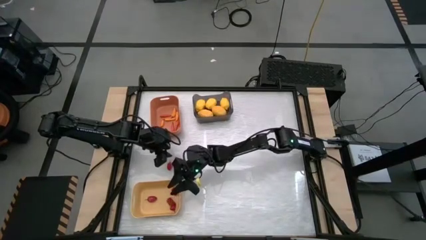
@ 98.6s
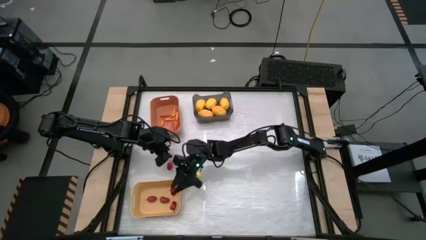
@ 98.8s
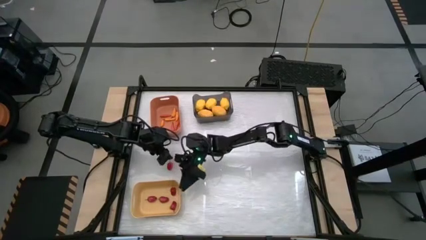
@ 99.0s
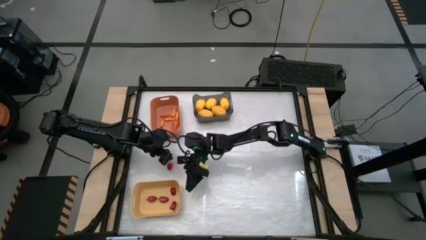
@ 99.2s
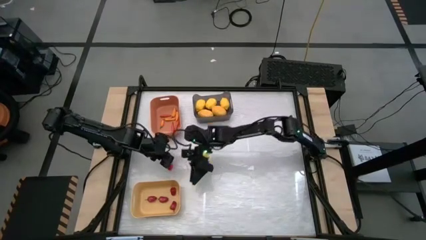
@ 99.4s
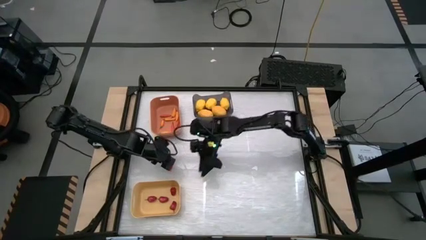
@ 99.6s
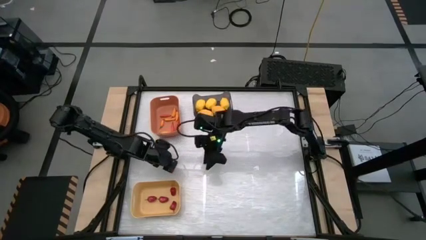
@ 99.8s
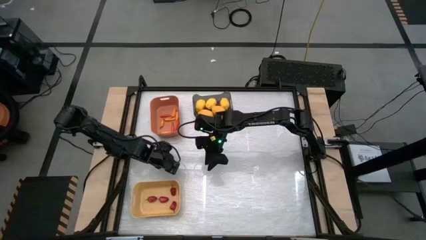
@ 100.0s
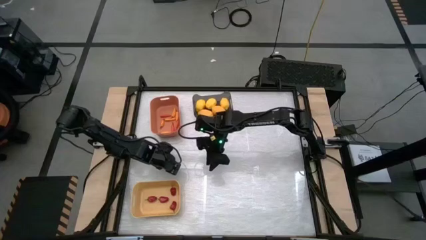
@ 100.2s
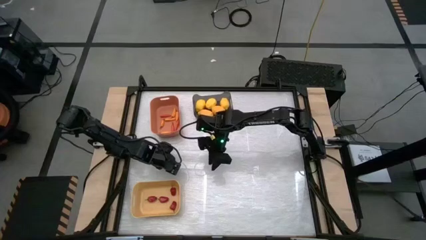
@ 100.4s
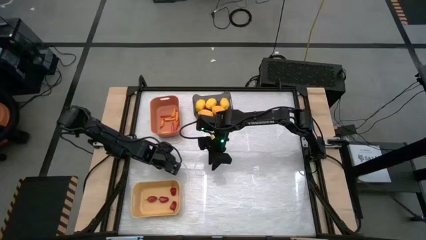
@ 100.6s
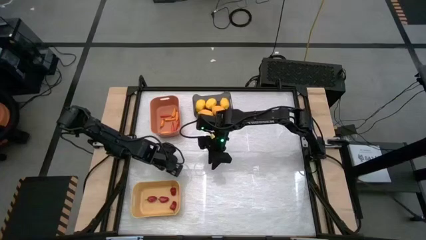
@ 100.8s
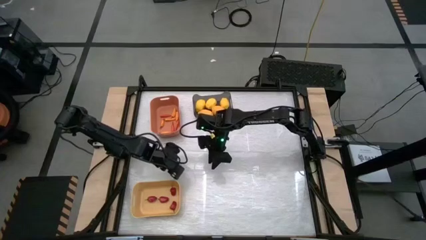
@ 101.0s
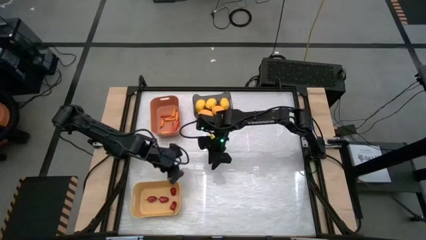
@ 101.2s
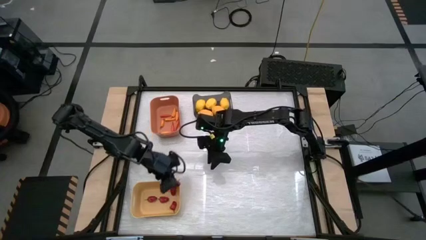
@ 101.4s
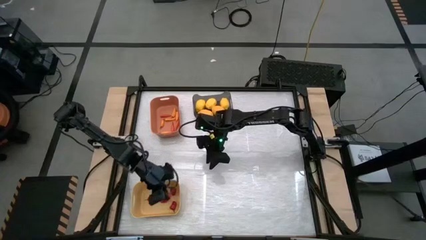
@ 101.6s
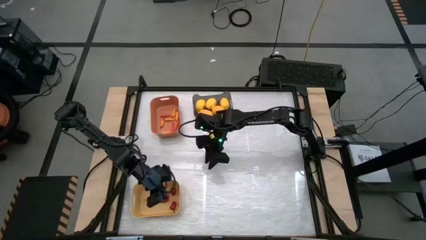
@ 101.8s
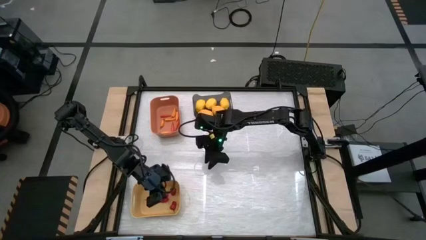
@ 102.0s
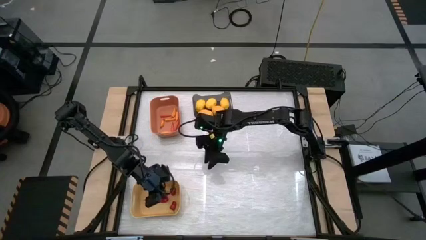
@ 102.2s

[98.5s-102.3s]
Task: Sort produce into baskets
Put the red chili pepper into the yellow bin

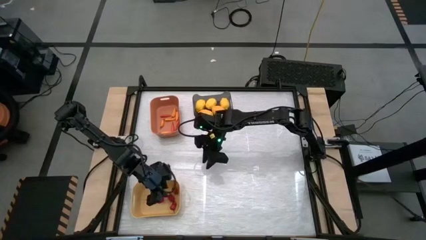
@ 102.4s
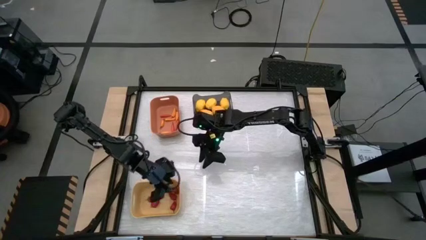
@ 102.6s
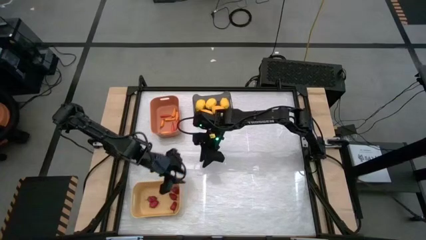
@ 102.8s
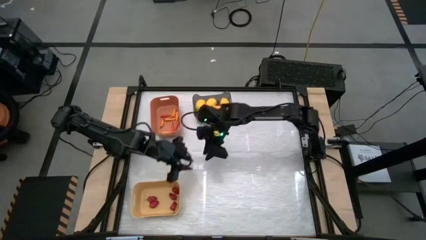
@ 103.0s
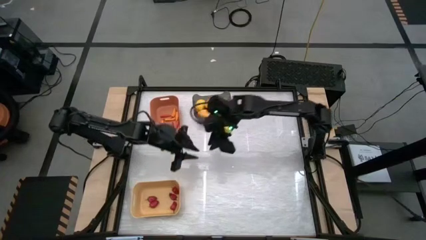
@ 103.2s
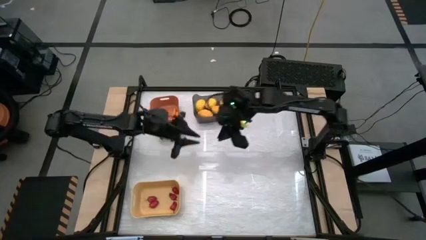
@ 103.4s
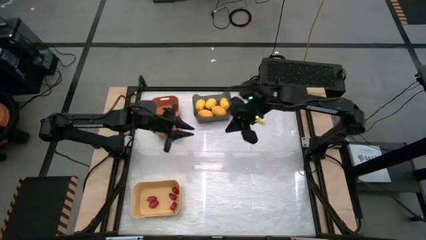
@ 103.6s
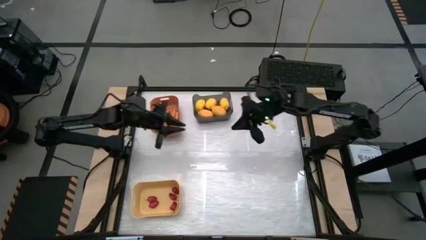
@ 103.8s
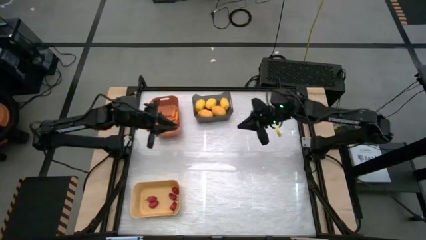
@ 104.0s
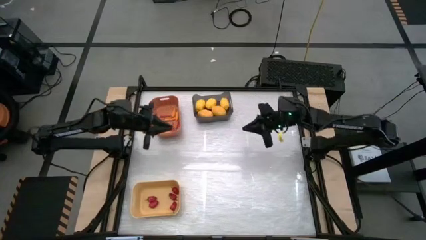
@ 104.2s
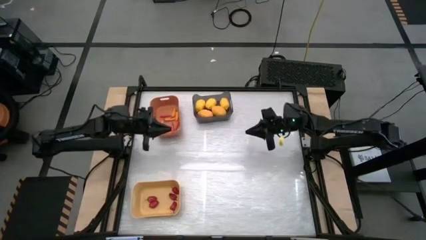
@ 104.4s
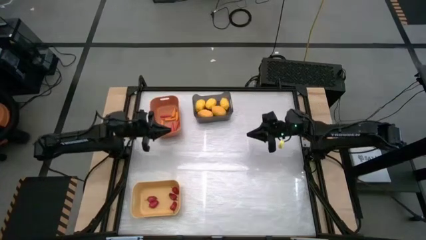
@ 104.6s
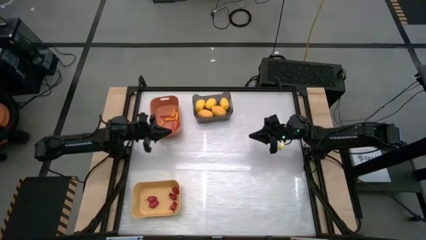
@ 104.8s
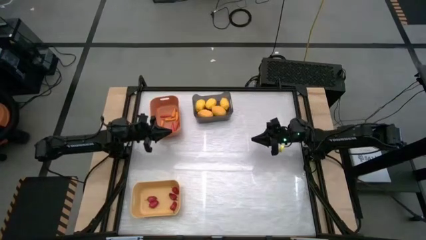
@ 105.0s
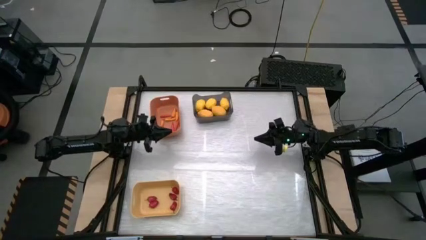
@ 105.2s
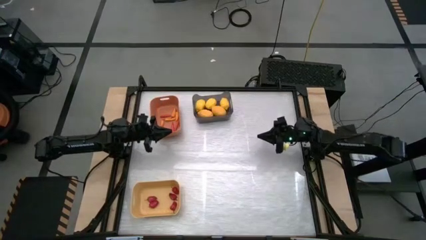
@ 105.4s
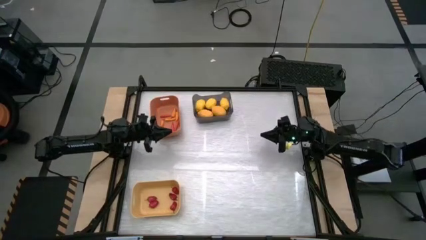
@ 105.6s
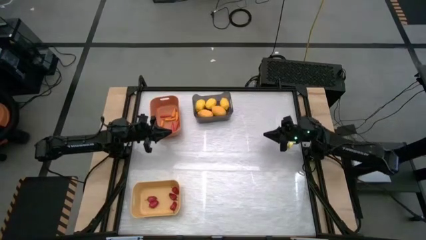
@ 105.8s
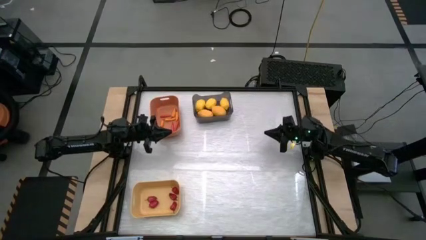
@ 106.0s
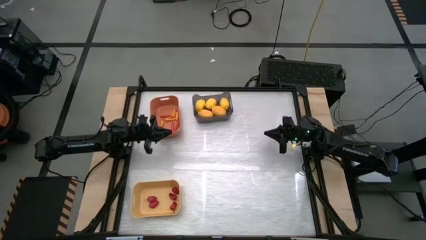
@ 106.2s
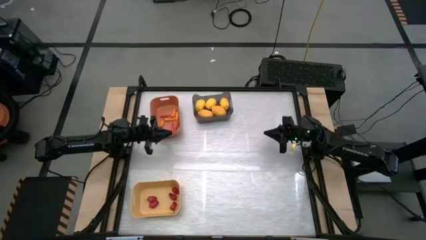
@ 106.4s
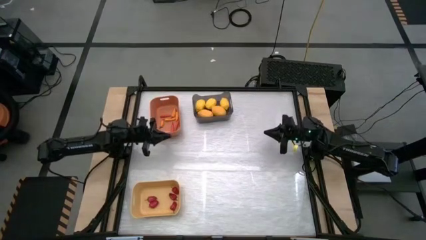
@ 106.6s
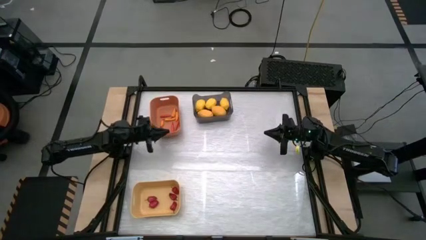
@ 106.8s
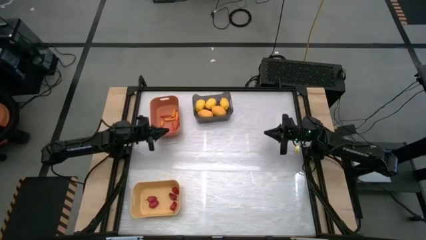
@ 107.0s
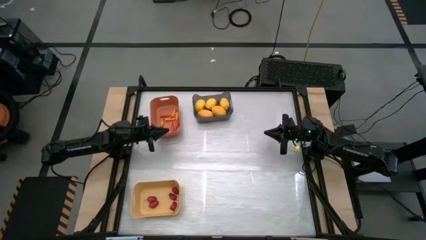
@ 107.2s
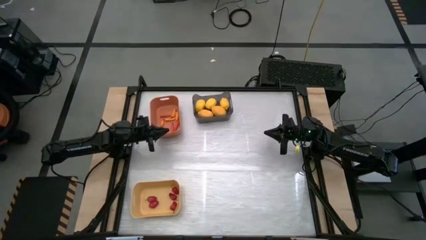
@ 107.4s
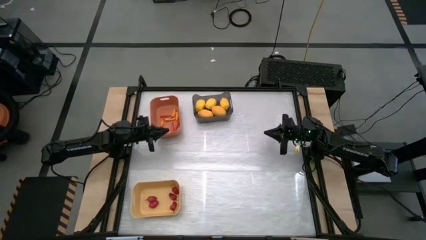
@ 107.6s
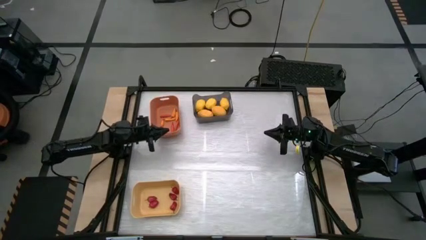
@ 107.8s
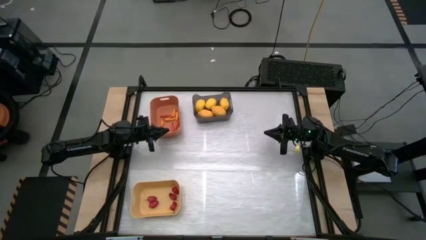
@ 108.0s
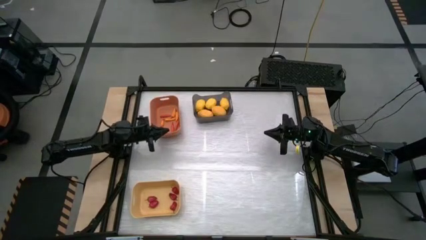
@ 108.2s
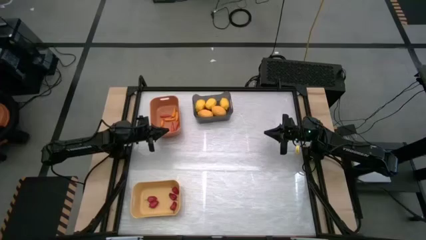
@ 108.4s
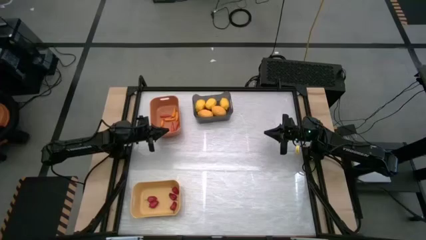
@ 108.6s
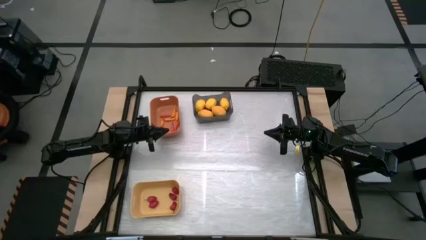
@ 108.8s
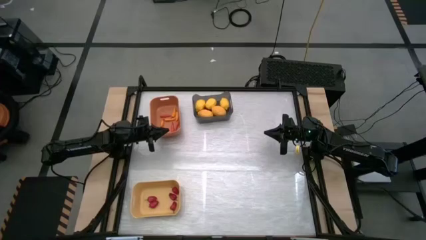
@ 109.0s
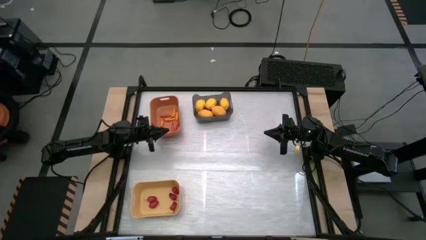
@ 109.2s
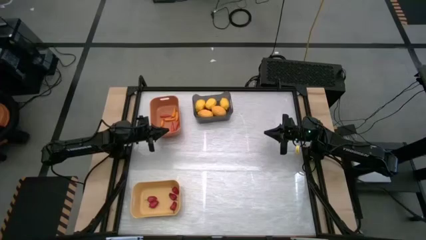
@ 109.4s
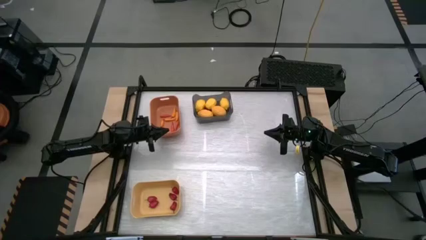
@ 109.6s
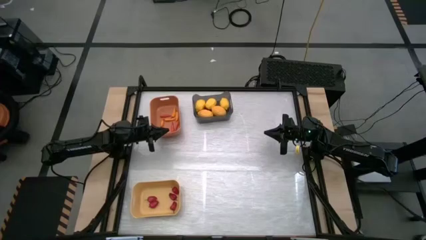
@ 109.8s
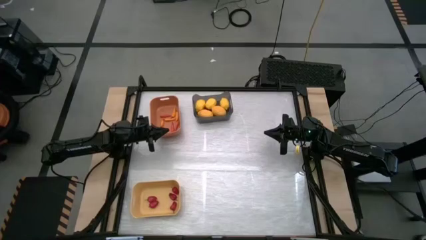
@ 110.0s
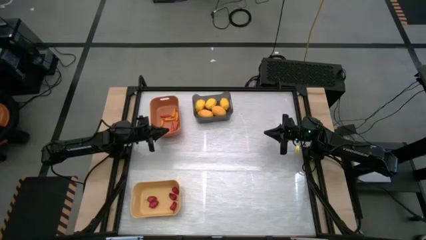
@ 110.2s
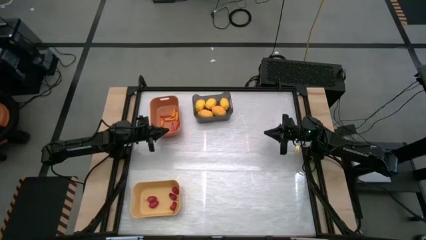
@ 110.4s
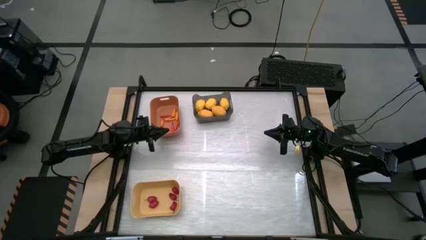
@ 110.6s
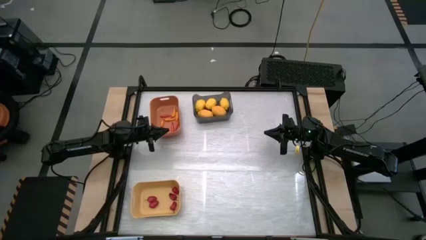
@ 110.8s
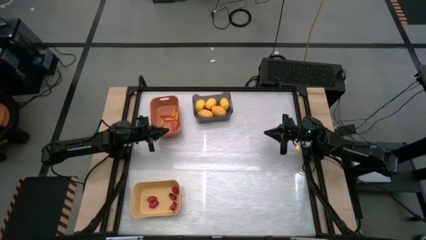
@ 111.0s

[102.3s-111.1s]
Return to Home Position

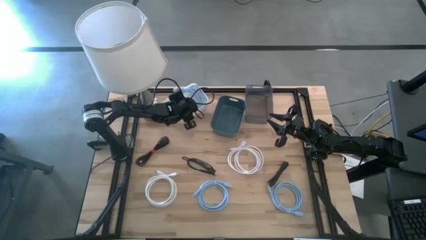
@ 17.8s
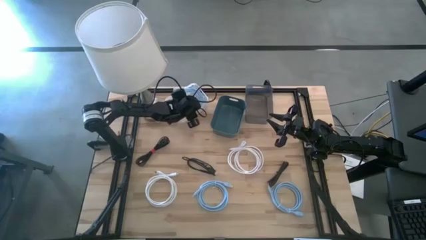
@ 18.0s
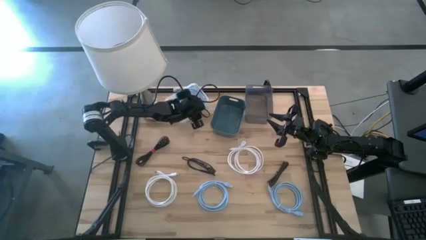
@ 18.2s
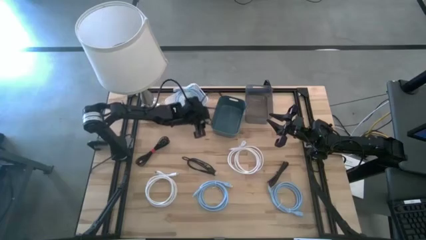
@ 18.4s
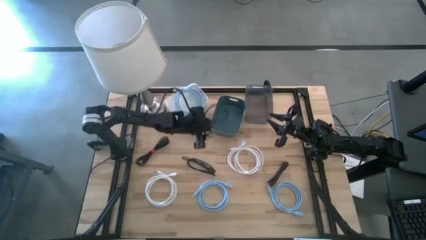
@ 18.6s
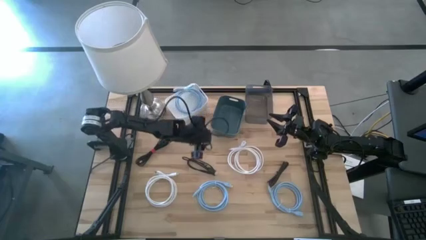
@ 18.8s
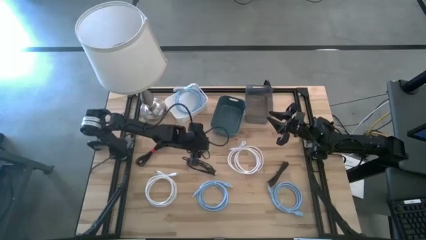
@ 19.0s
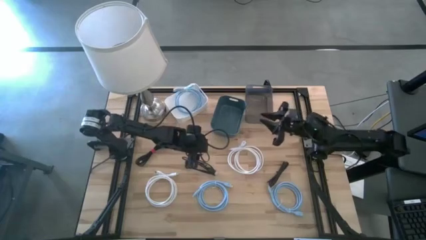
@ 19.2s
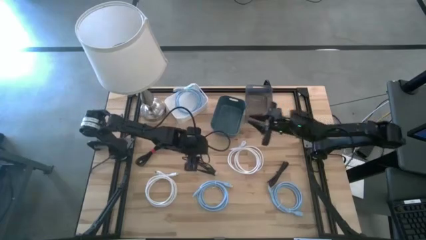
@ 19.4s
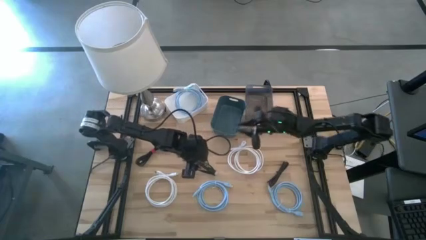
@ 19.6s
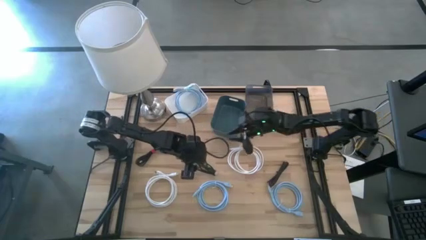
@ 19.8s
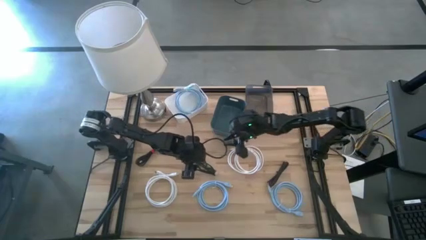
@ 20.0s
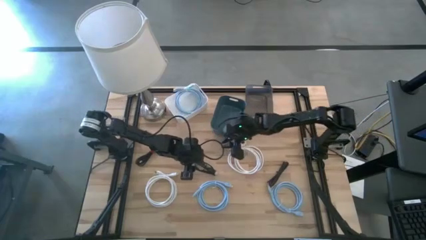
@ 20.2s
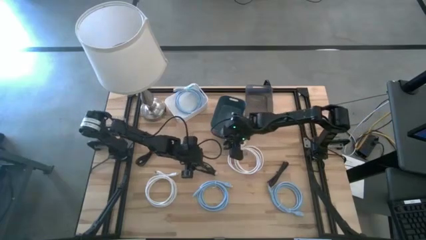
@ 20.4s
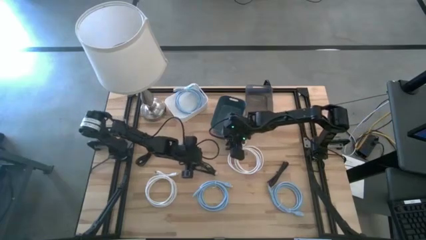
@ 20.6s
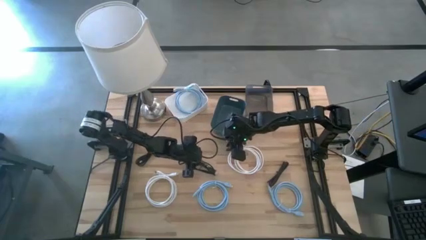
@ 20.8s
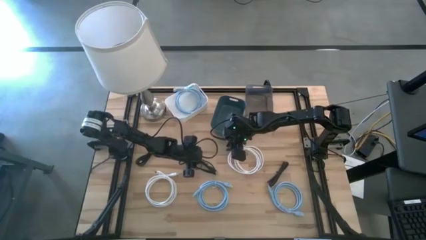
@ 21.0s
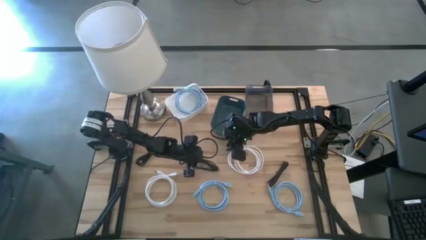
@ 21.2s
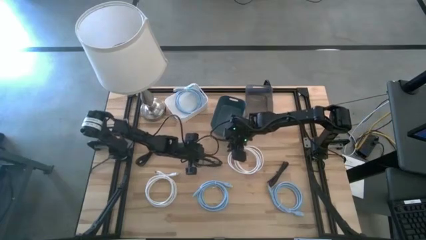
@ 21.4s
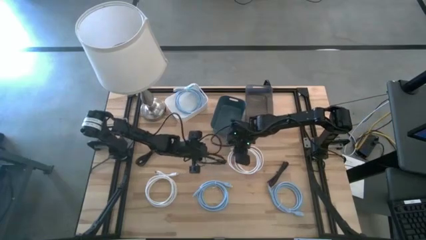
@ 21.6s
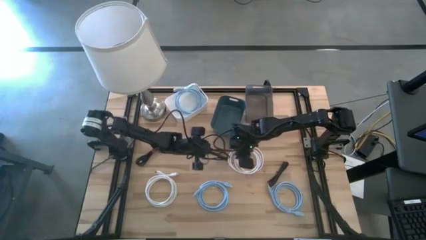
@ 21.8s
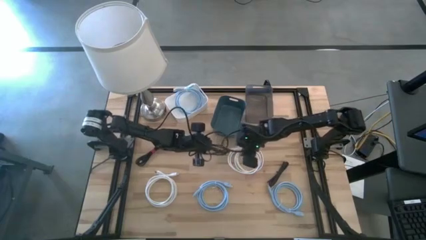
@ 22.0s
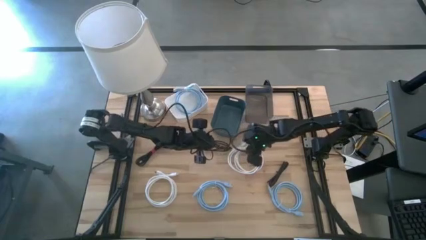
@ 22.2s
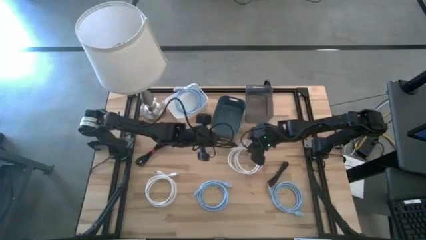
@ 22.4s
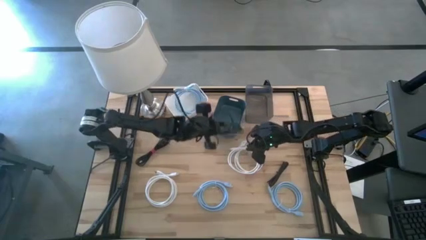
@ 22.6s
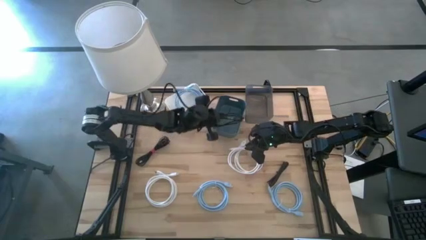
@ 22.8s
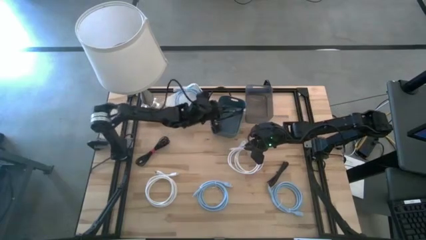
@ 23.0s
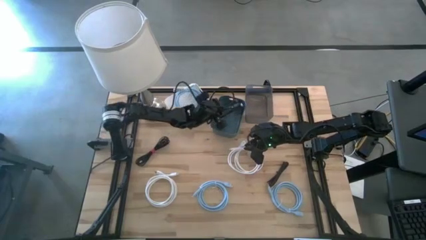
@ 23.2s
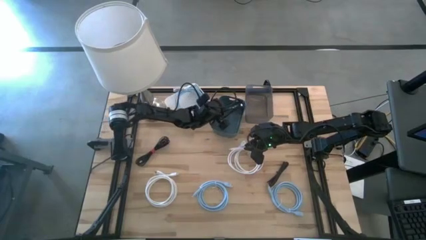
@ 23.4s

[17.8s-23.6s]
Task: Pick & Place USB Port
Put the middle black cable into the blue bin
